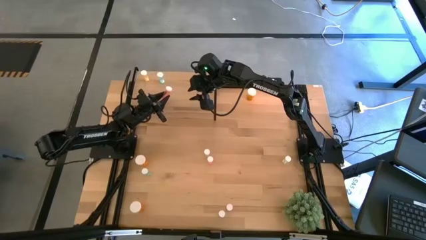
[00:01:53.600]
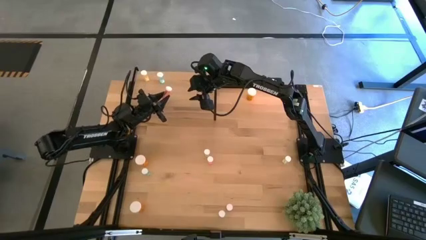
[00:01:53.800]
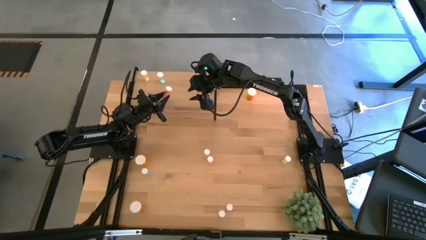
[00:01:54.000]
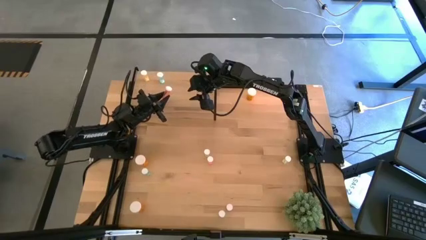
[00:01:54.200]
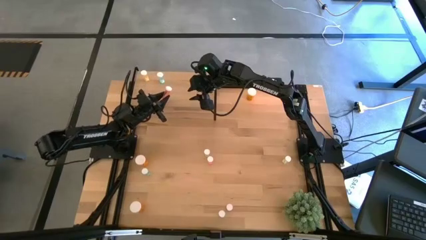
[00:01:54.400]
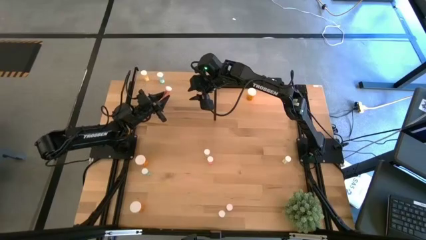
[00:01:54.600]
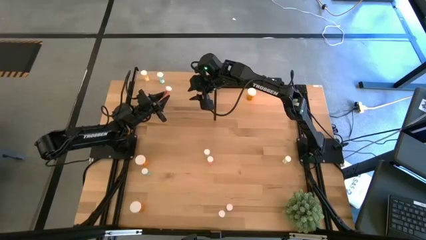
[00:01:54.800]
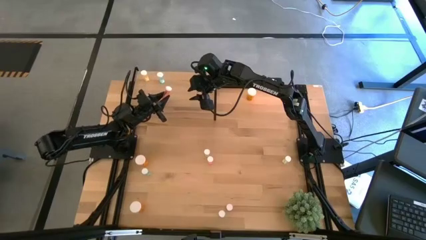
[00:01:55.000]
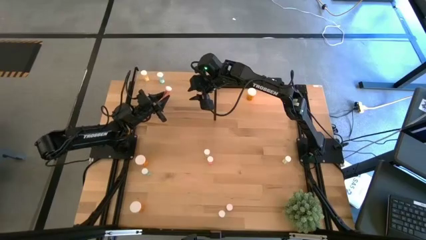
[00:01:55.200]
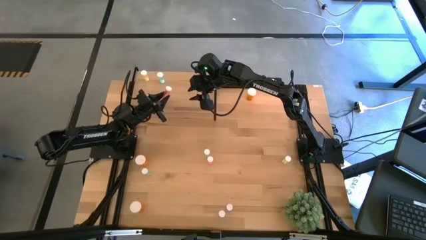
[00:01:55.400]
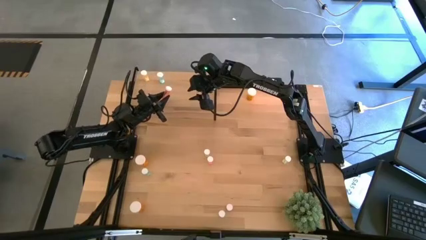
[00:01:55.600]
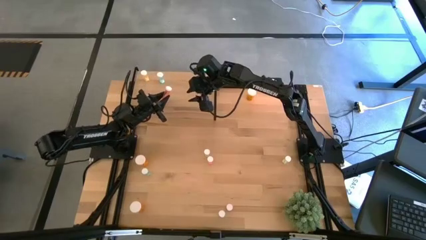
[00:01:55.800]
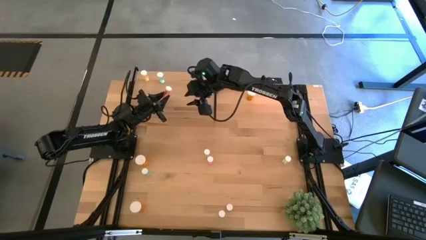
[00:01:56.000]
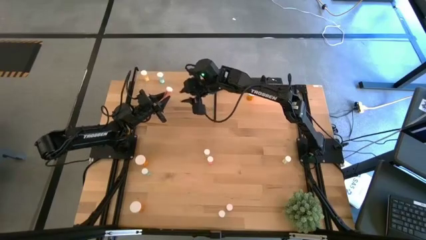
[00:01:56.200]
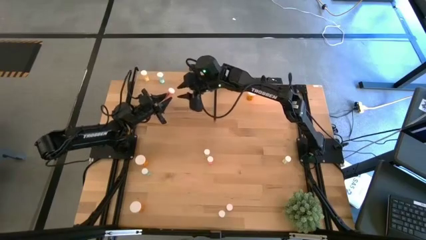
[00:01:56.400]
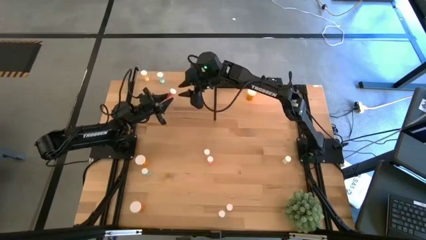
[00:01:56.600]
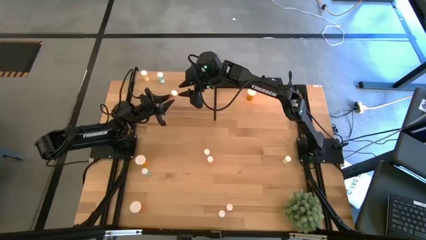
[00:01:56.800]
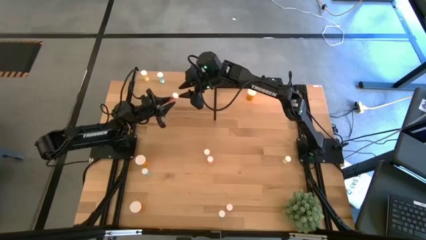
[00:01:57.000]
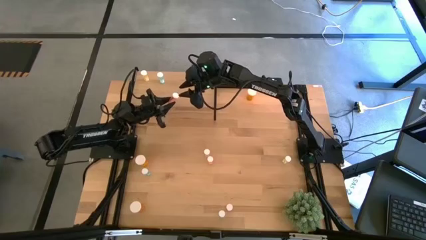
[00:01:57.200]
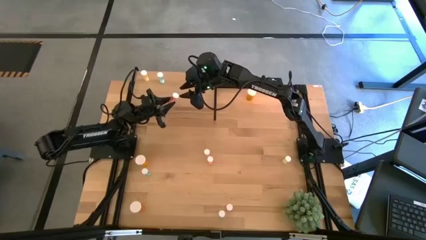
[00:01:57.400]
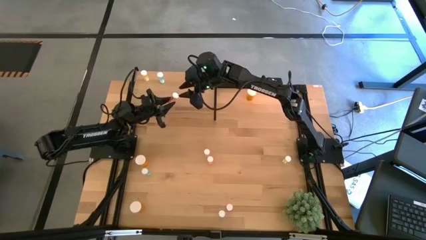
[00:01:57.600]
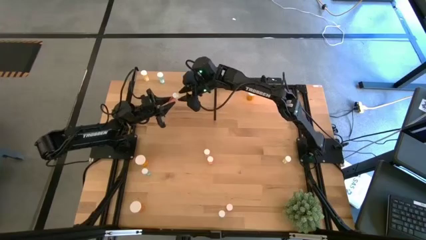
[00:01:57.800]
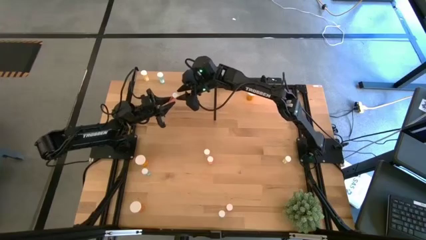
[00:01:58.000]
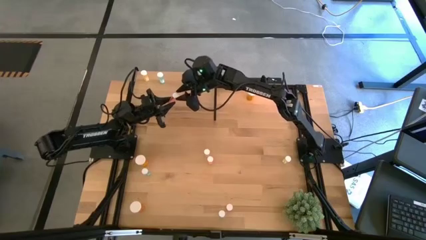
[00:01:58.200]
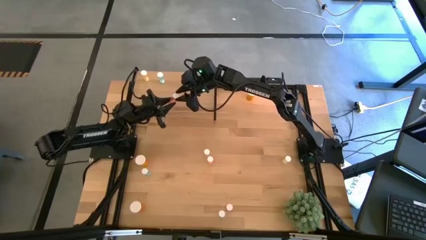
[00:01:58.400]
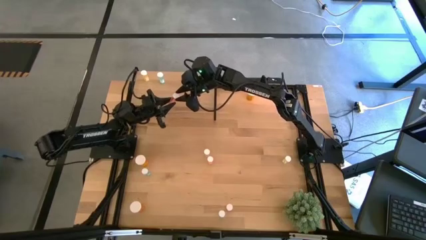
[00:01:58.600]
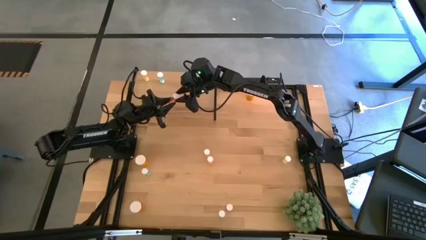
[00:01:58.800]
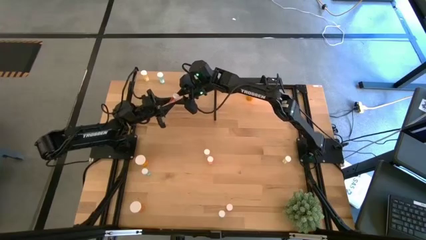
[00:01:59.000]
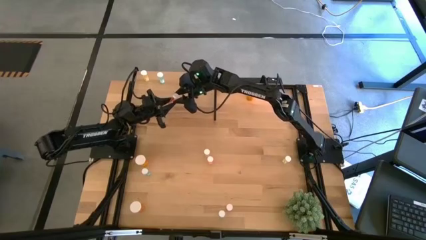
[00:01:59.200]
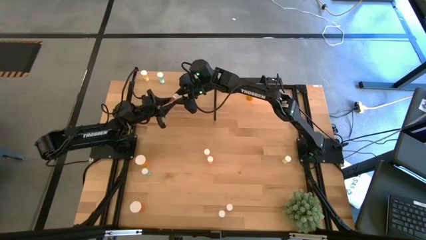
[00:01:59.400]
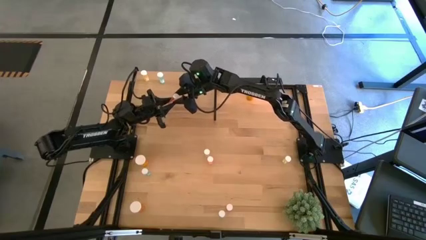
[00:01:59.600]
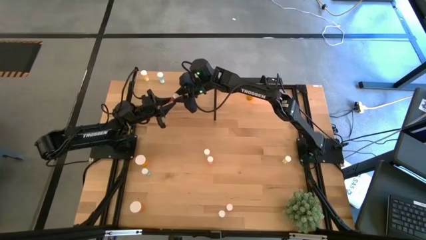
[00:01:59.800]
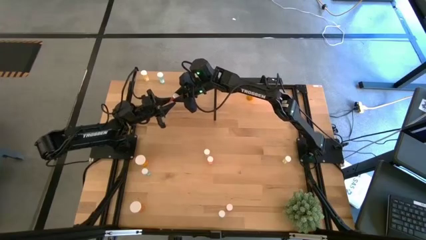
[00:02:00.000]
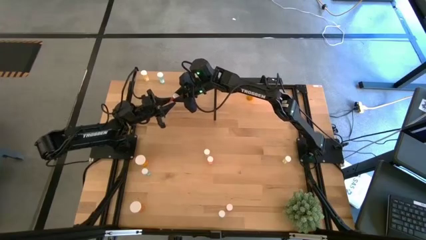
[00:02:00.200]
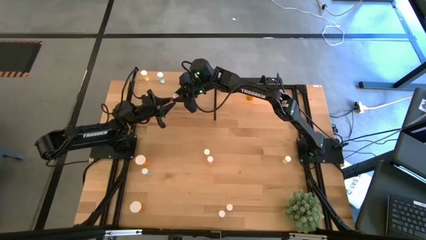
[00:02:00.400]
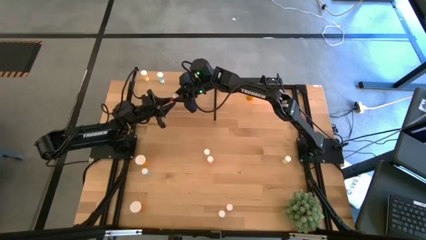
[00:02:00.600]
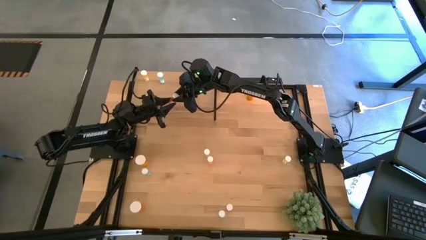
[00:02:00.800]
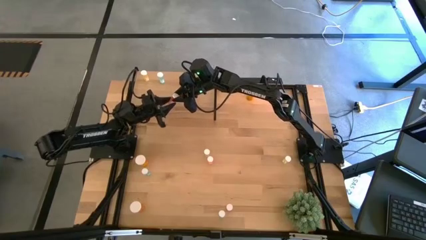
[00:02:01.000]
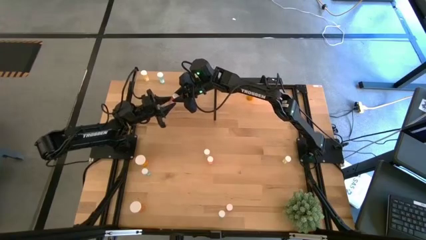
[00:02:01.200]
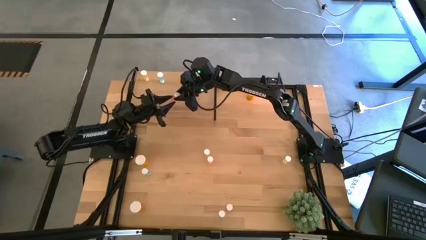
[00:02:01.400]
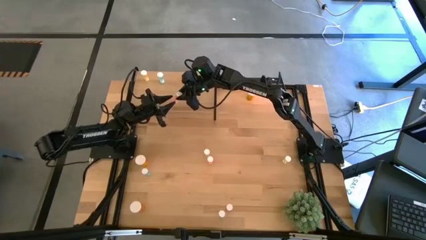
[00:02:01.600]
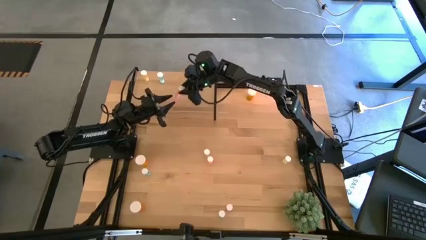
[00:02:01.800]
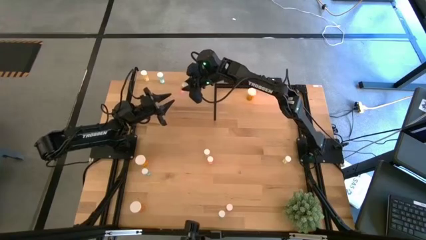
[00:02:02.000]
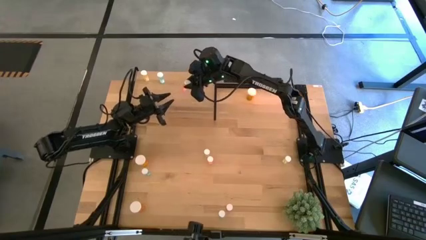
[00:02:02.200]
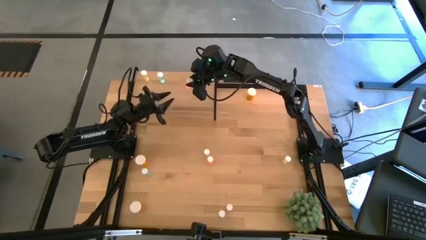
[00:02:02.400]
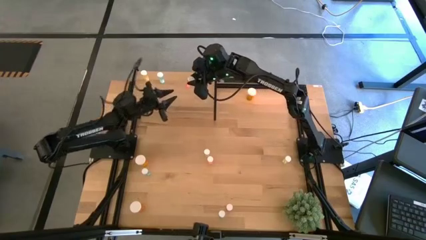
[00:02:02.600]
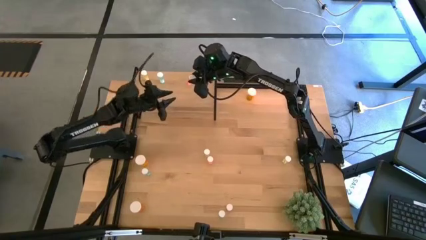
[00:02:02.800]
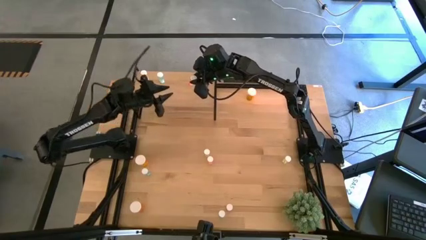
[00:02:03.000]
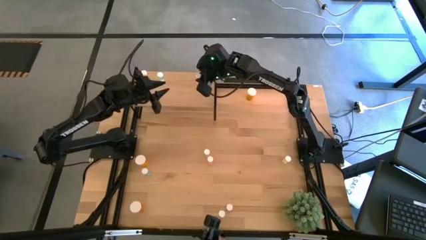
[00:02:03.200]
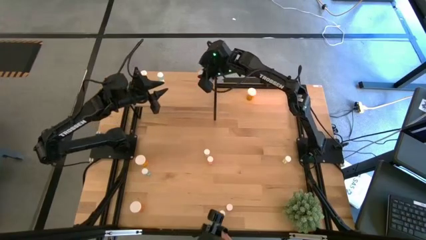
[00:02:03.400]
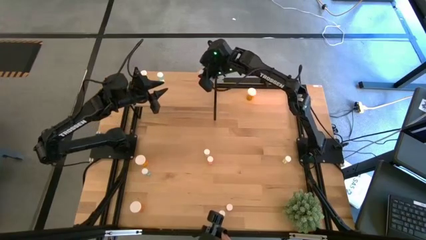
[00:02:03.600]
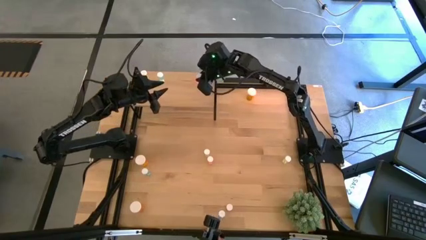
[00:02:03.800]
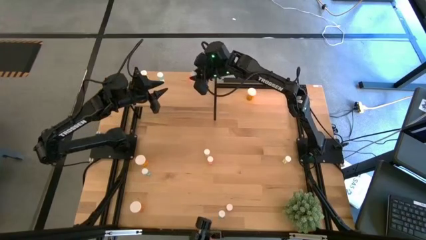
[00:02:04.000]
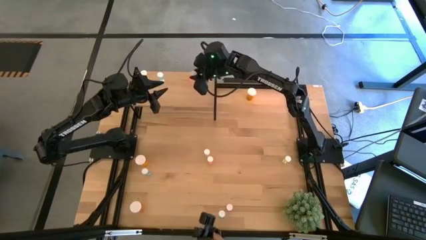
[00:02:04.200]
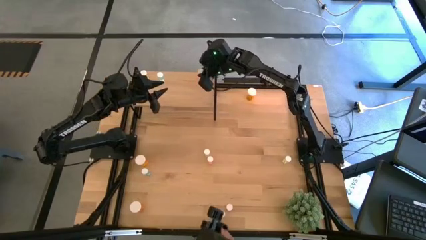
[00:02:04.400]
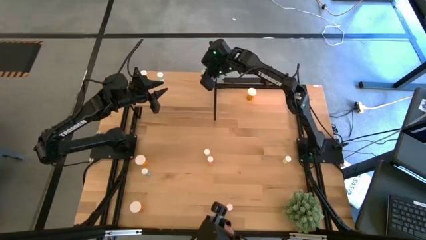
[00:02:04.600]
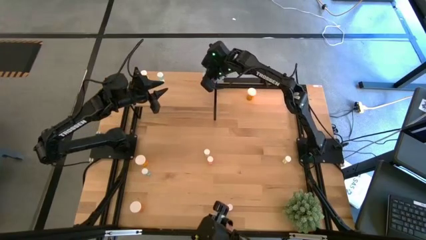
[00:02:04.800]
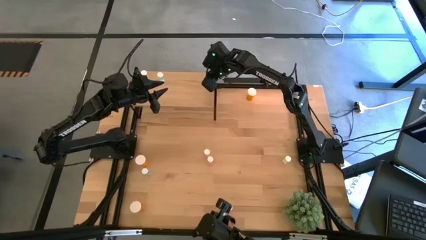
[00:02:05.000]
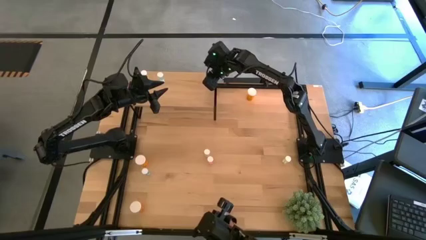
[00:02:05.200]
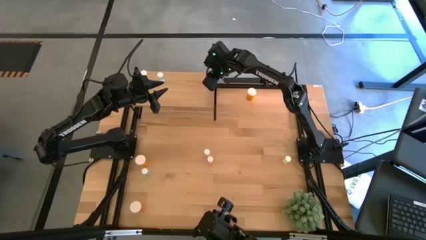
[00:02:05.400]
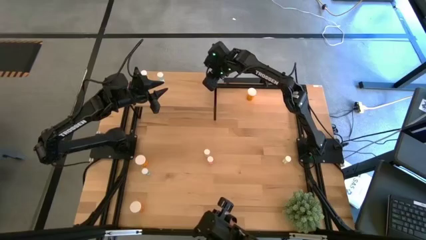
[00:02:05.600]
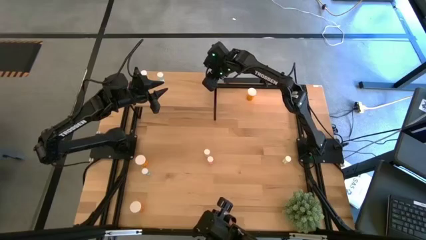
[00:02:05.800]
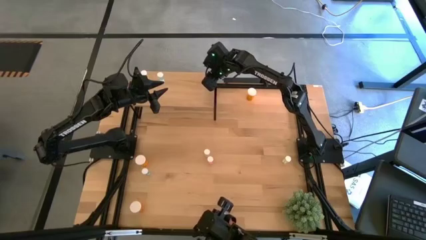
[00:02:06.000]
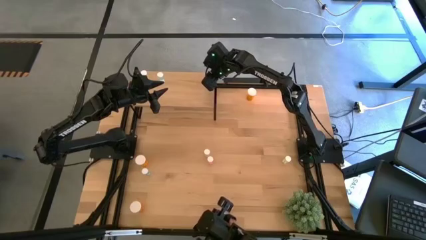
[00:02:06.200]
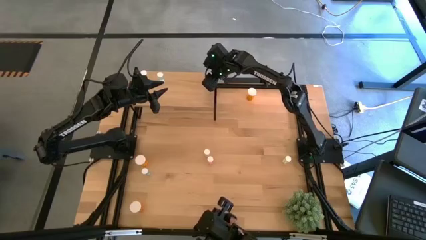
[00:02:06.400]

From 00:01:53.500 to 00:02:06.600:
Task: Pick and place medicine bottles onto shelf by color
Put the top right small red pill bottle on the shelf
